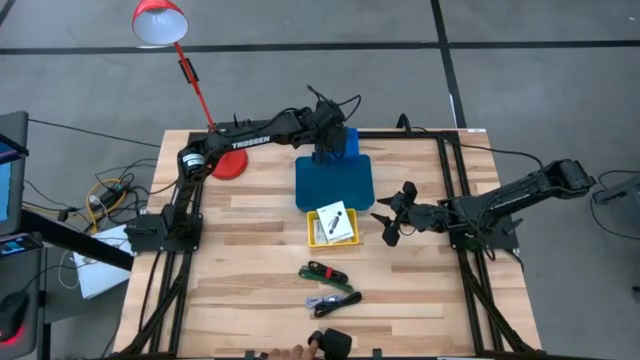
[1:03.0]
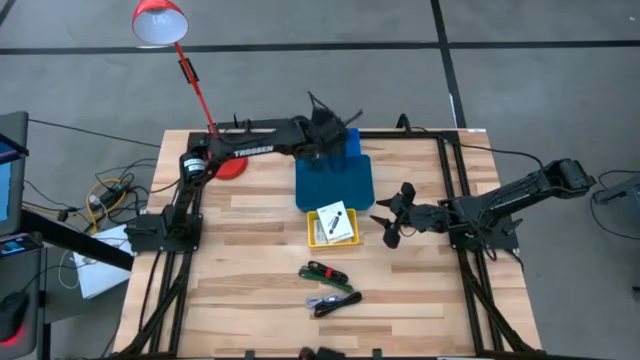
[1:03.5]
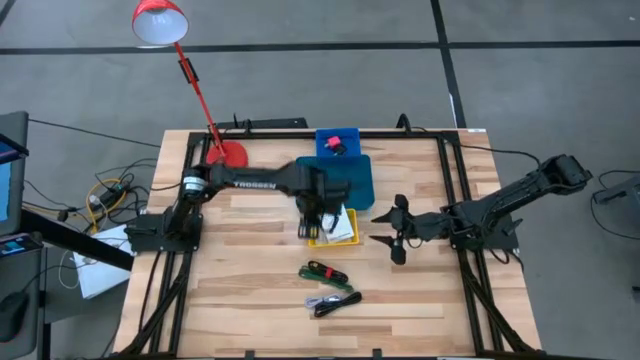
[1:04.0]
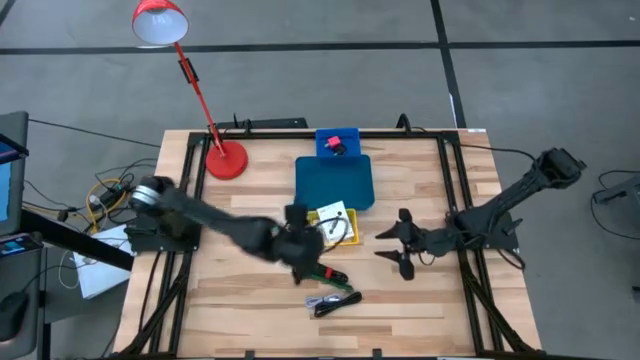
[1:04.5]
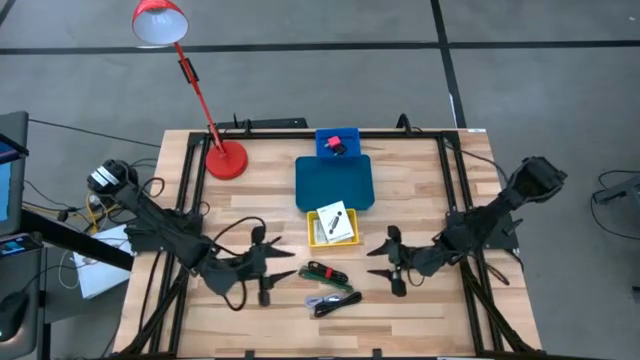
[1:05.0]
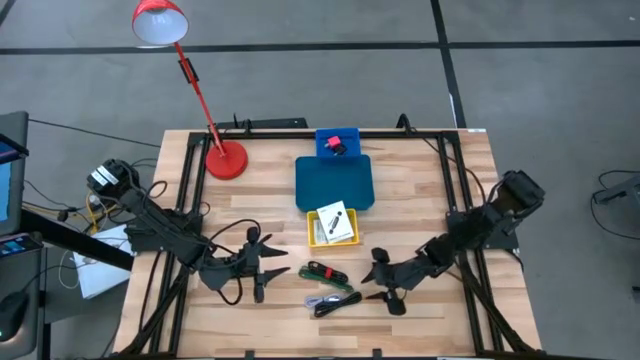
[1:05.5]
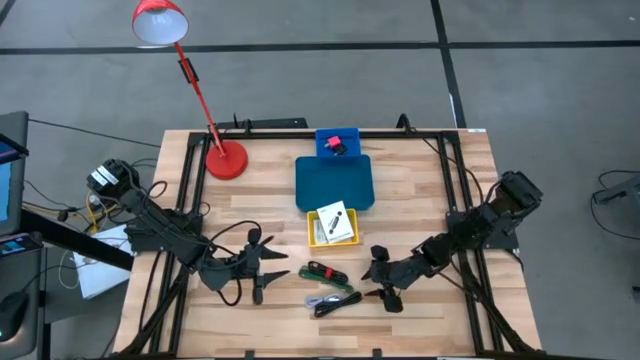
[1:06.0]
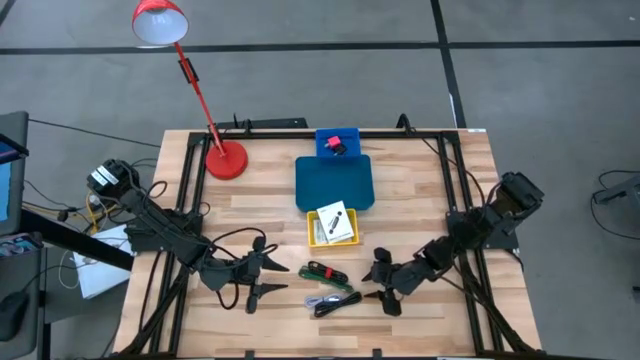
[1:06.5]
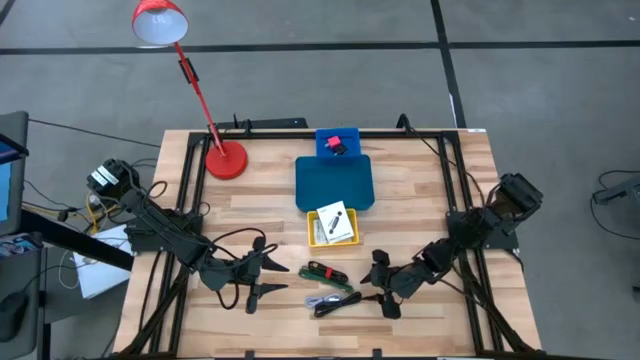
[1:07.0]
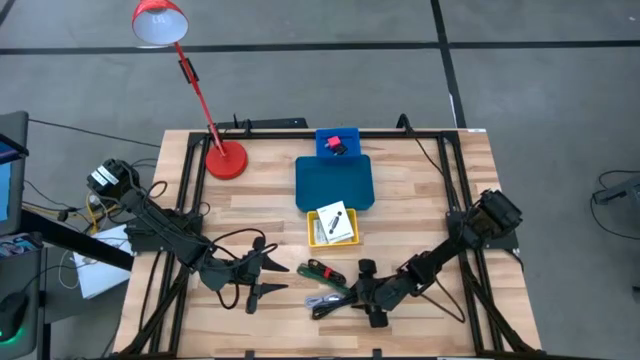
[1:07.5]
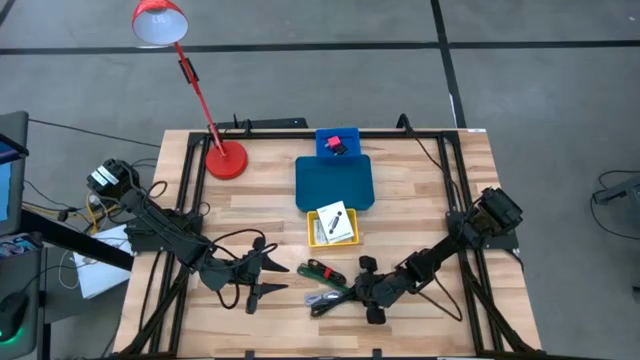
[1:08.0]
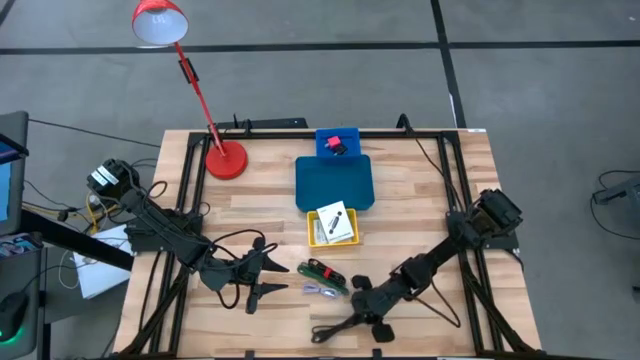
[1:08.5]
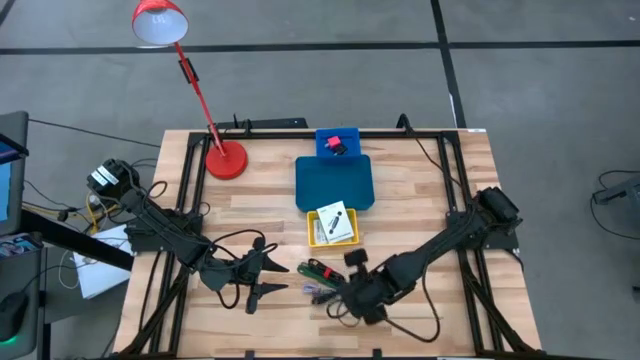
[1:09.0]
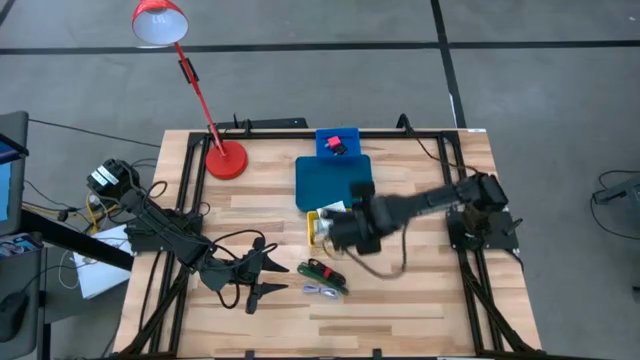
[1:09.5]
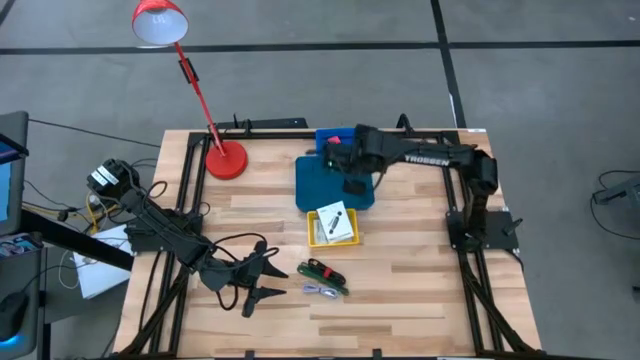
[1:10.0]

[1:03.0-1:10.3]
Task: Pick and place items into bin
Put the bottom black charger cable into the bottom blue basket

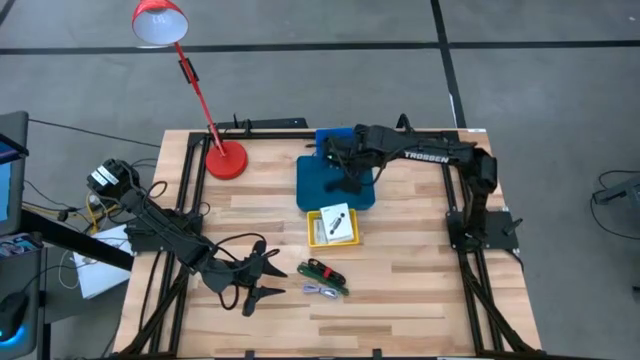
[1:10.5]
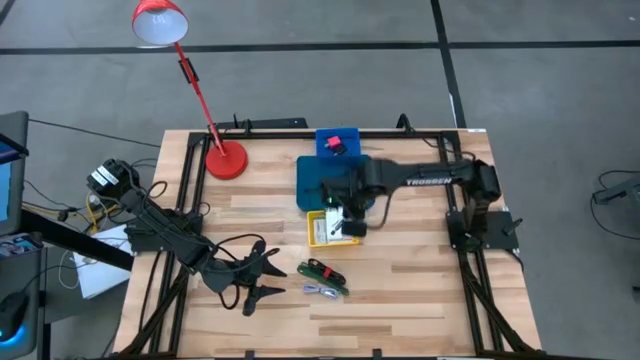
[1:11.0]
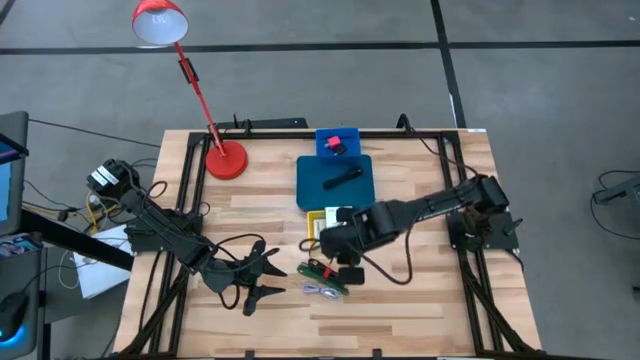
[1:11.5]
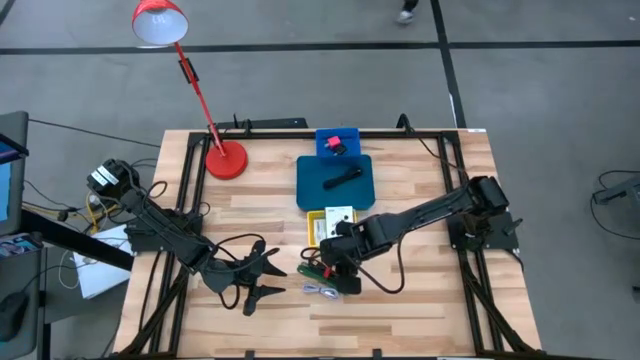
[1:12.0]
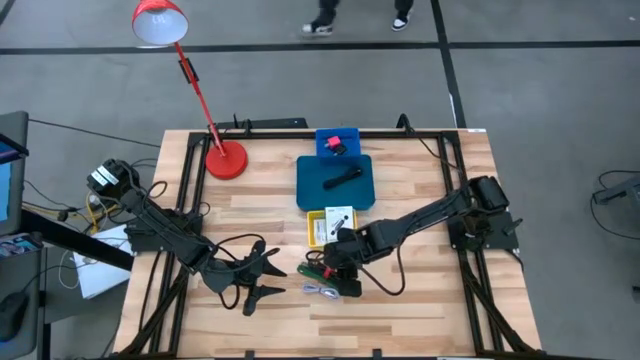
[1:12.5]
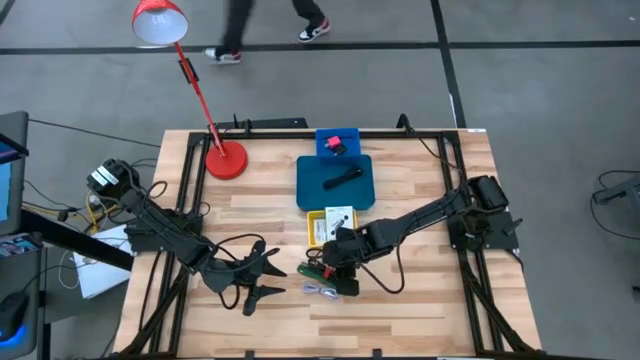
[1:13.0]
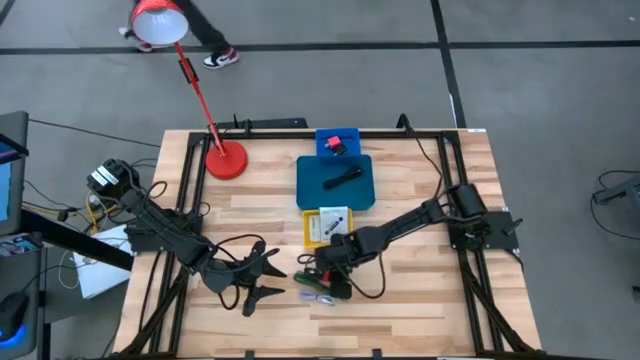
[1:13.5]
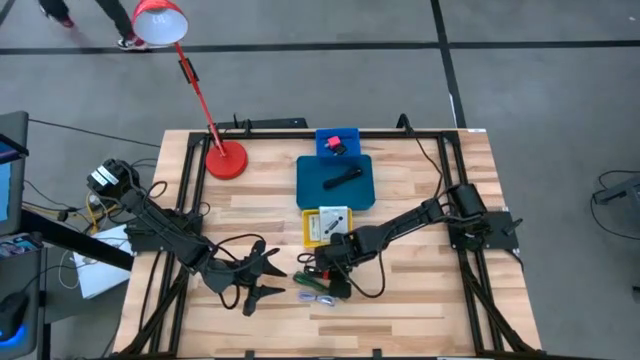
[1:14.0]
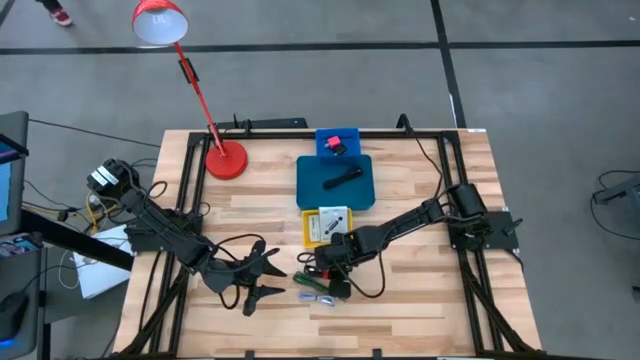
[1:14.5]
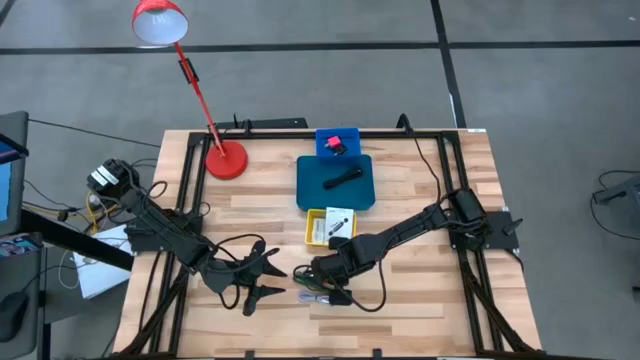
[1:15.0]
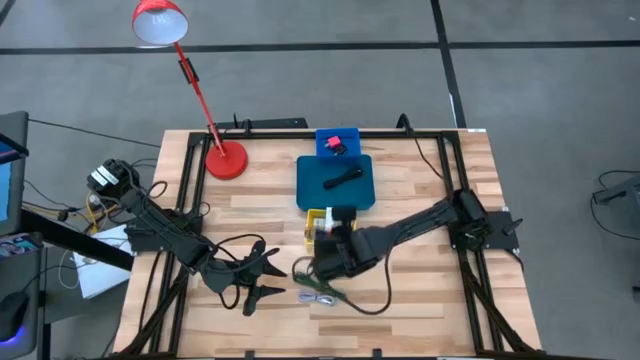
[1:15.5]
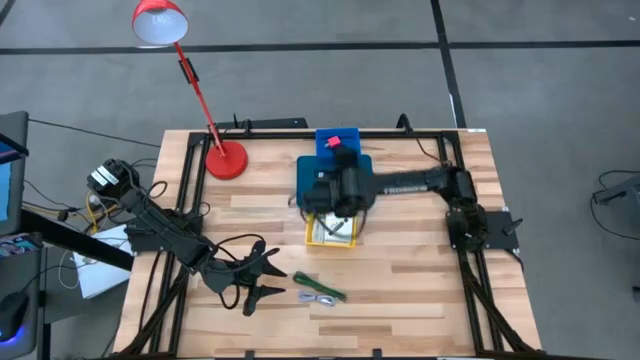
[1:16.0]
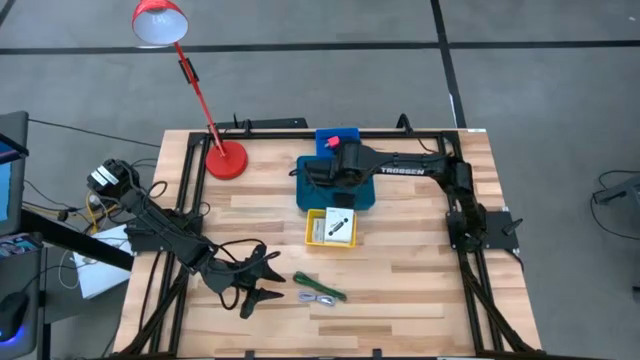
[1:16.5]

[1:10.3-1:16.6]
Put the black charger cable into the bottom blue basket

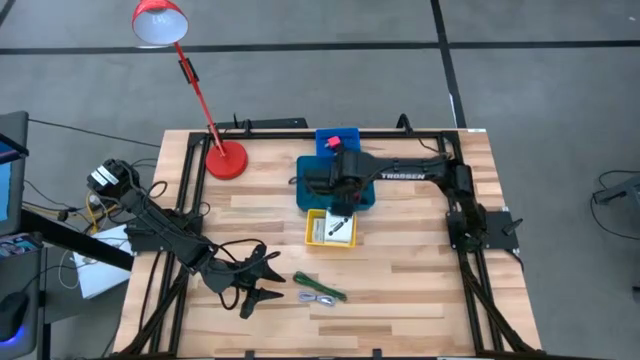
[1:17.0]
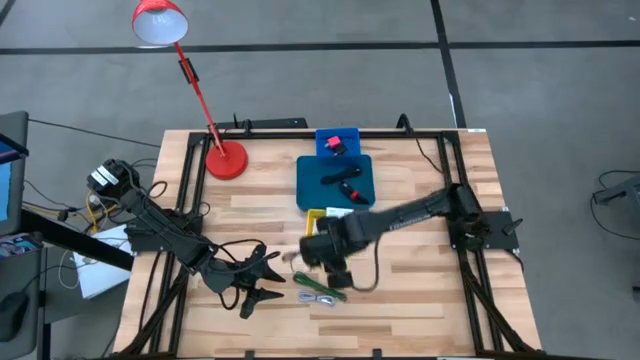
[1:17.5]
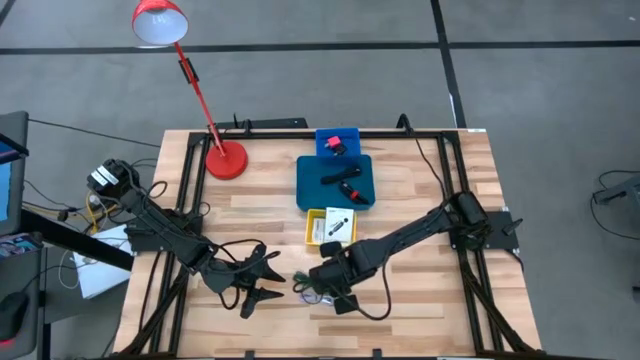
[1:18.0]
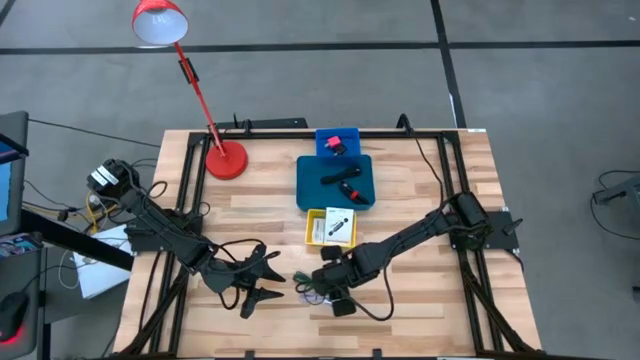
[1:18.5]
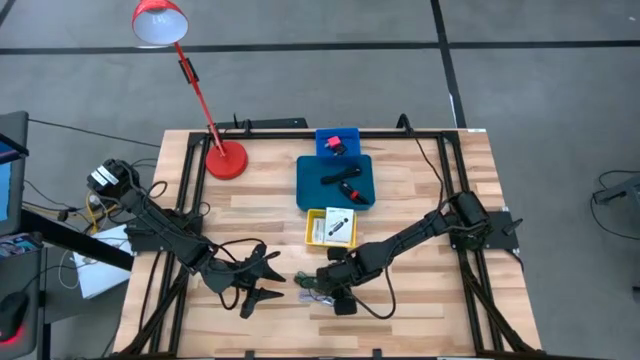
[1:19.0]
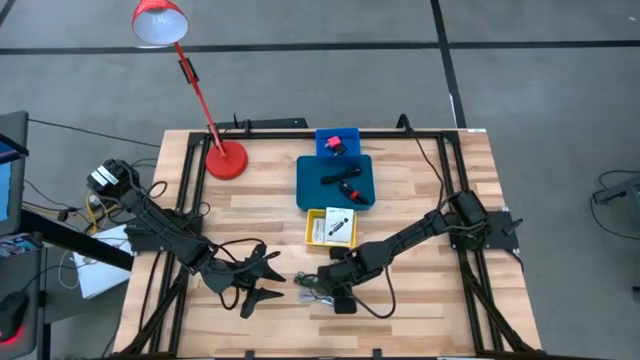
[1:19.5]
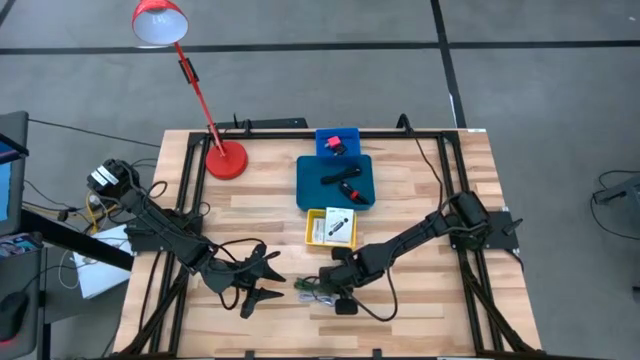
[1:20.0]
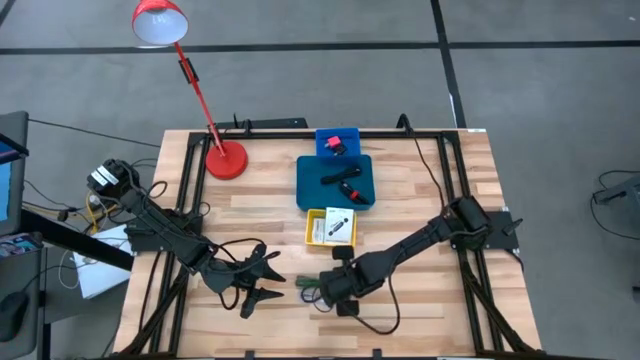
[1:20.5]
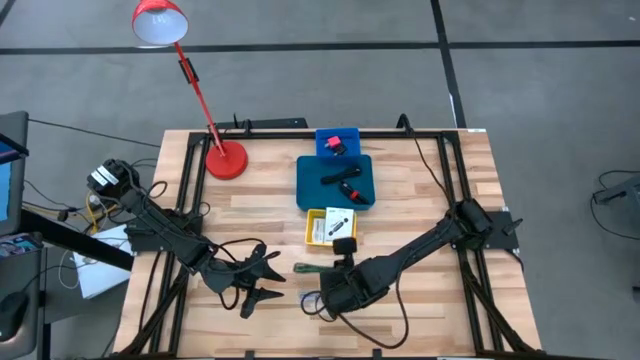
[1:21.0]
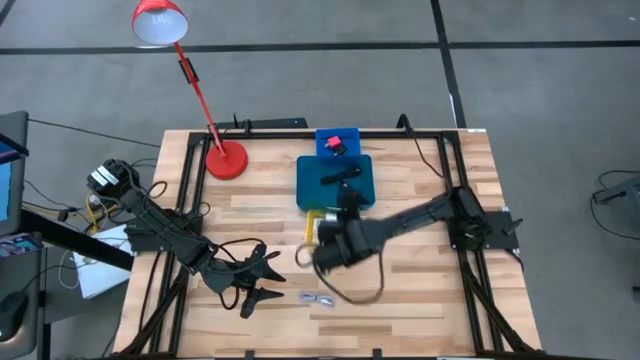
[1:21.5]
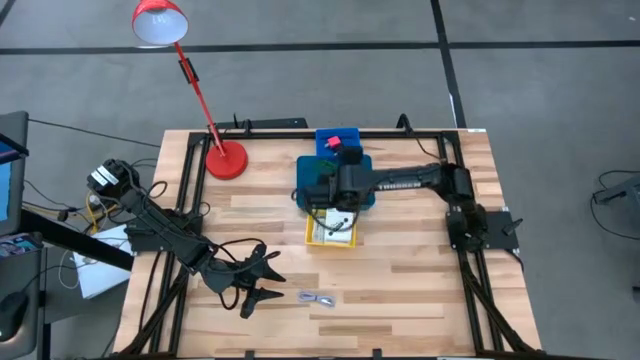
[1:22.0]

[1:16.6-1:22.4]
Put the green charger cable into the bottom blue basket

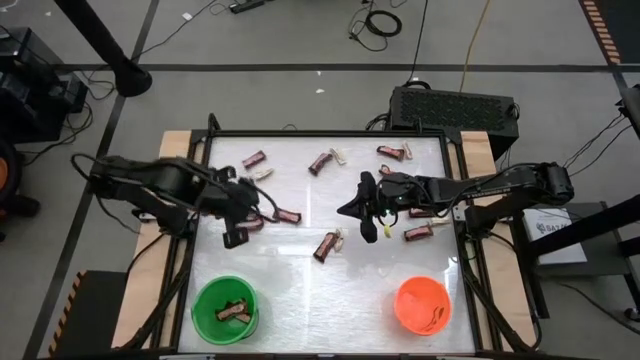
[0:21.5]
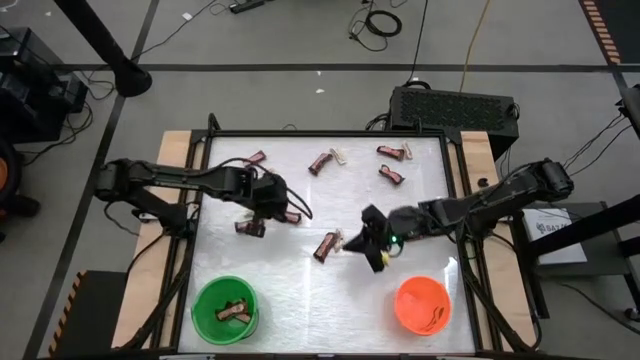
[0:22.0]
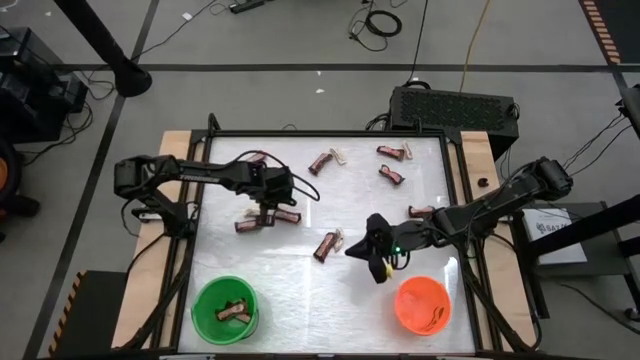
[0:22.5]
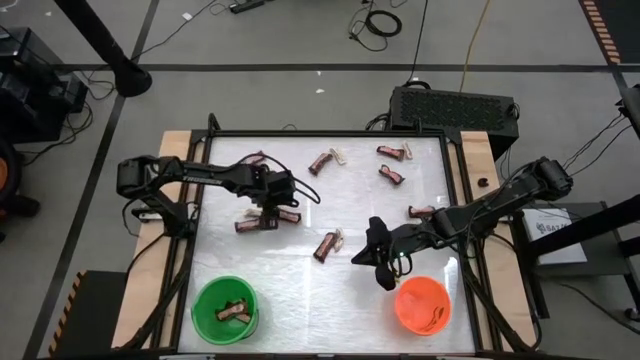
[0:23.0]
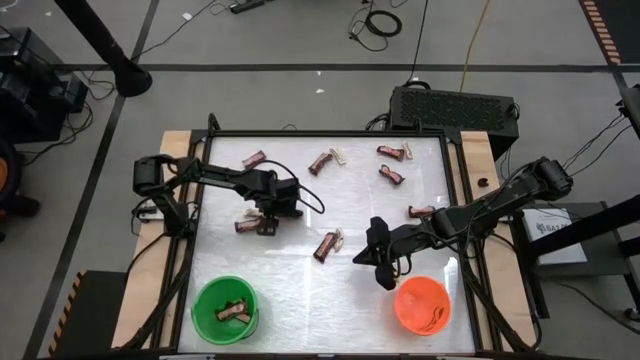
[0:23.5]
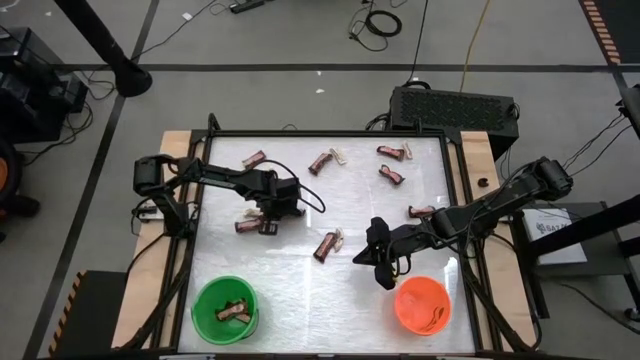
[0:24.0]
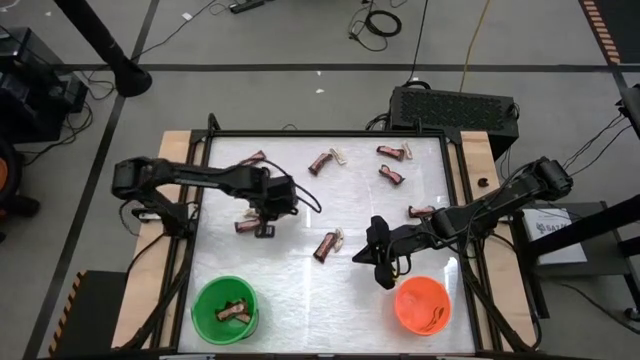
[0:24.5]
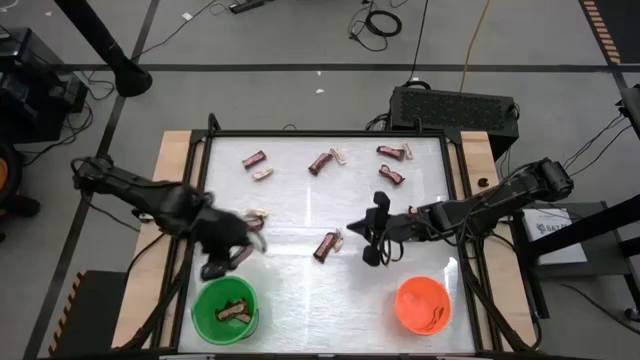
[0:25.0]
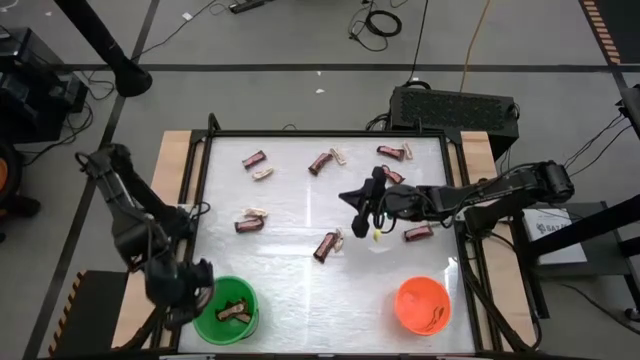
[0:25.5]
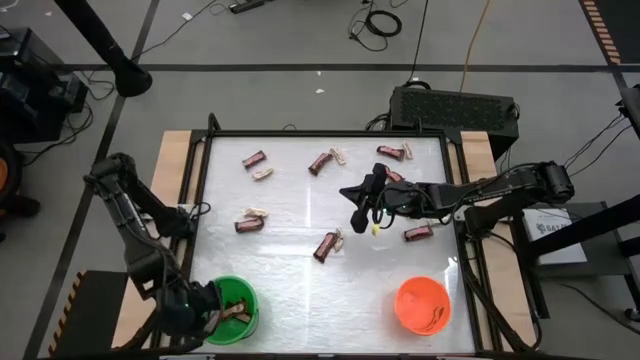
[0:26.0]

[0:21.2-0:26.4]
Task: Sort candy by brand, put in halloween buckets
Put the brown chocolate bar into the green bucket
